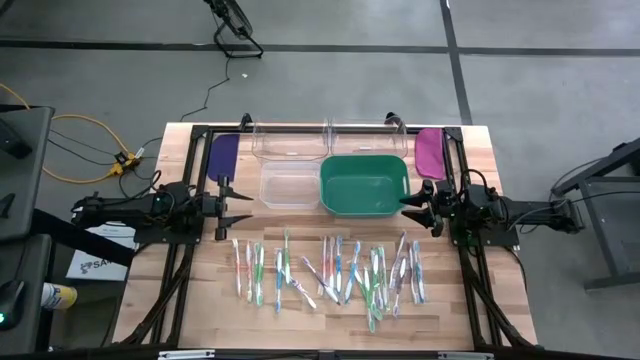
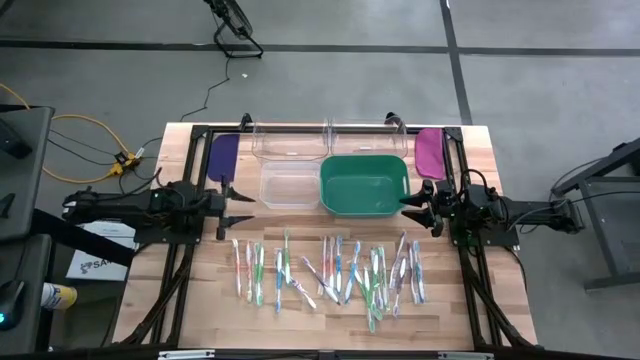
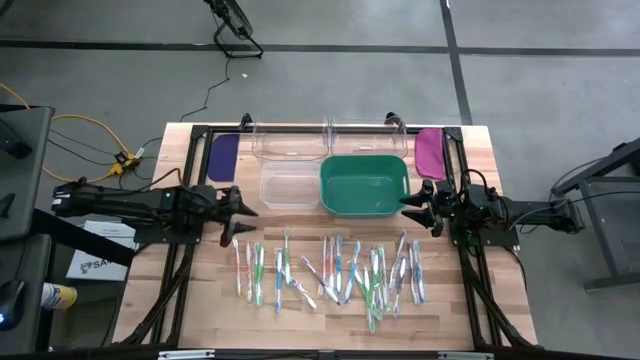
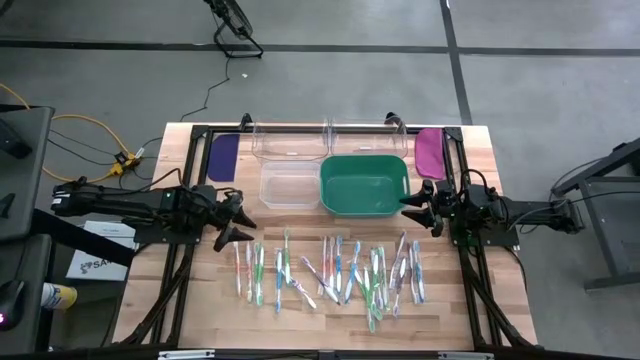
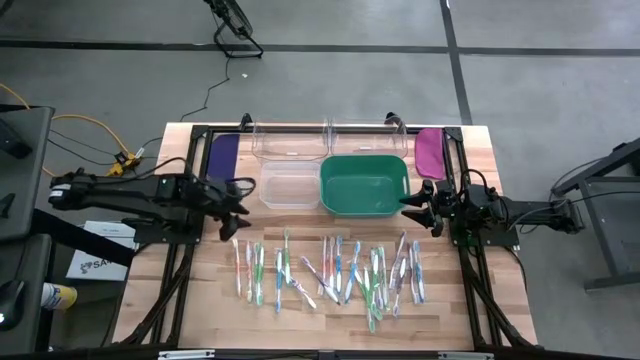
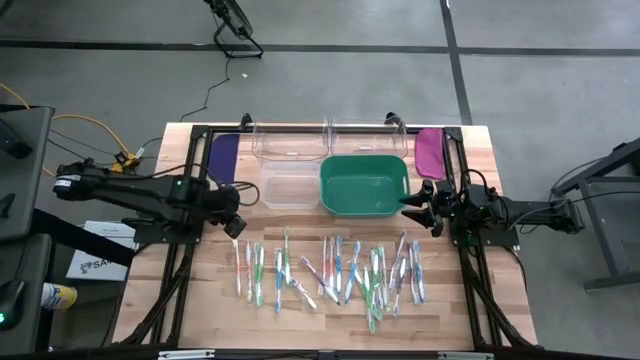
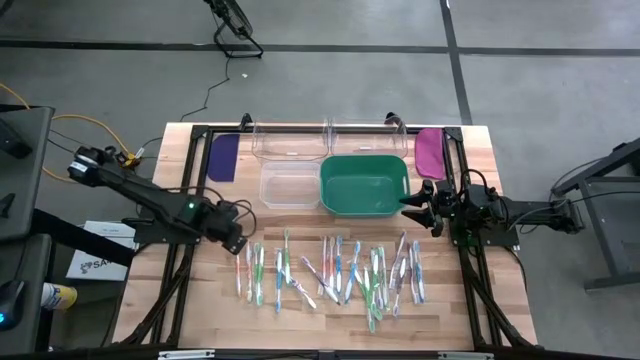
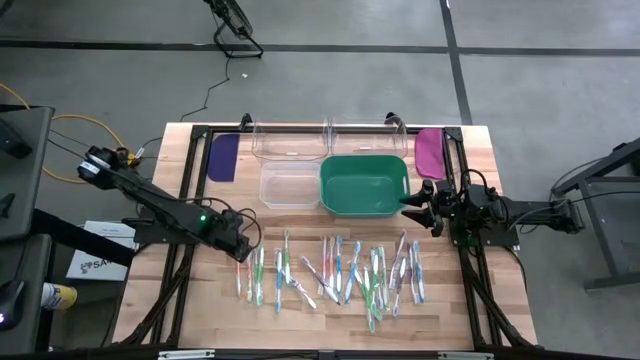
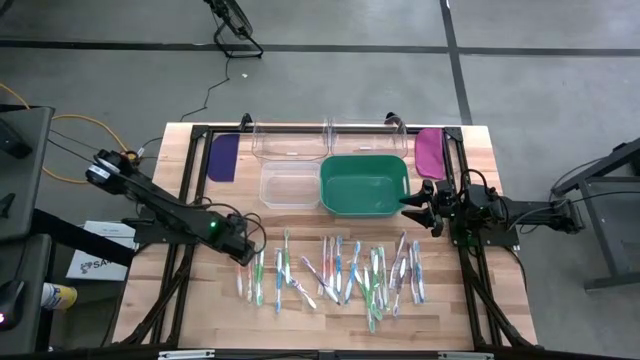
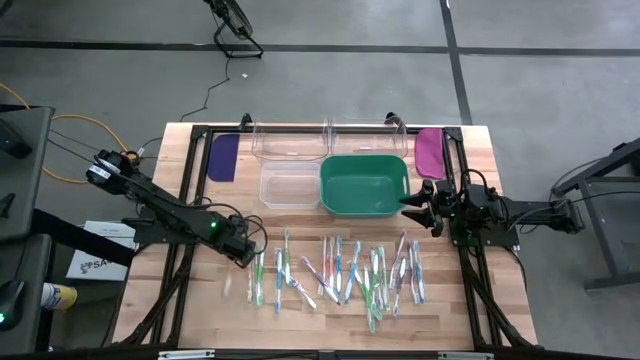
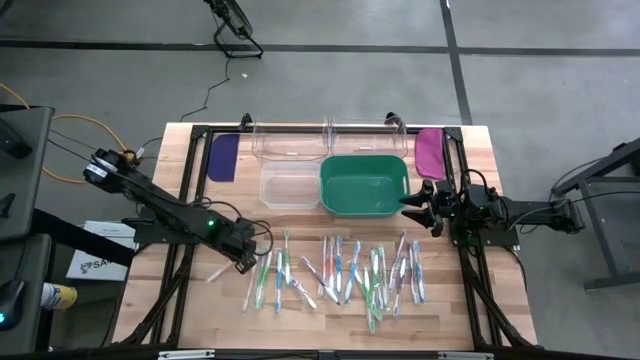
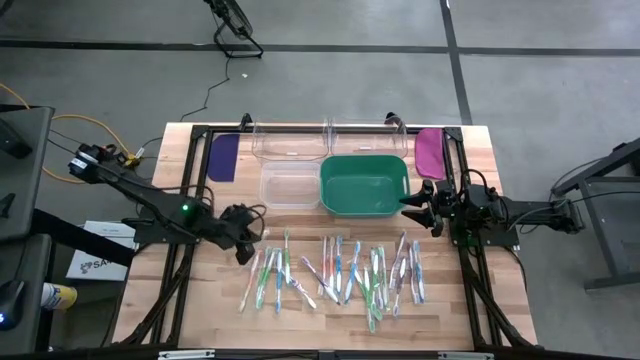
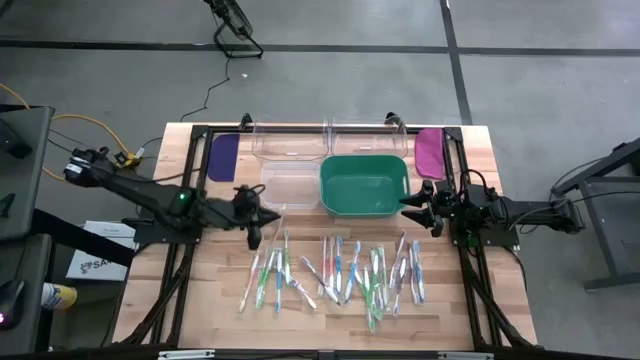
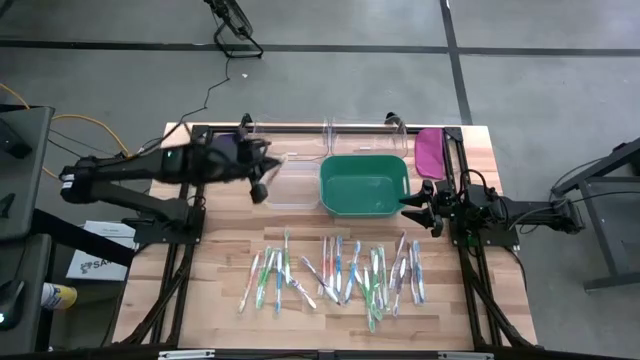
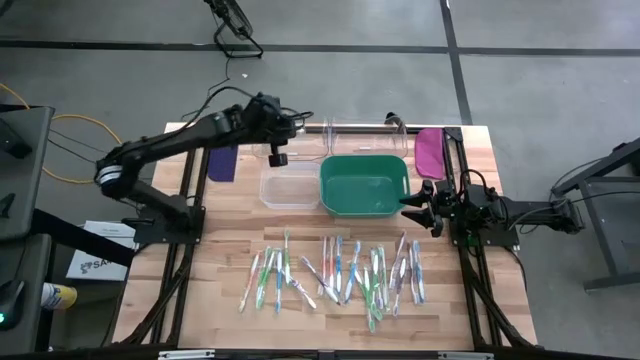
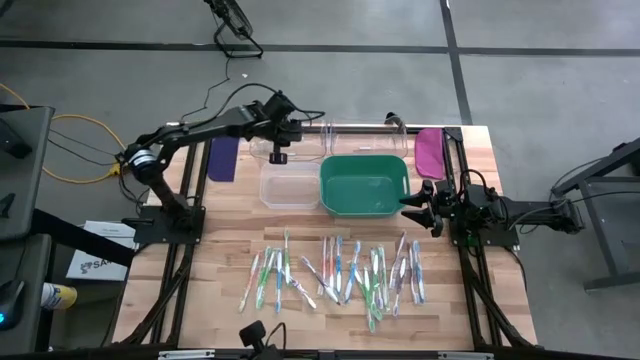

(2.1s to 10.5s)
Task: Pick & Place Toothbrushes
Put the orange toothbrush into the left transparent bin

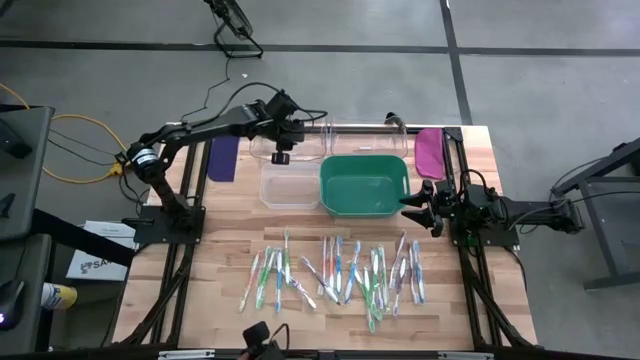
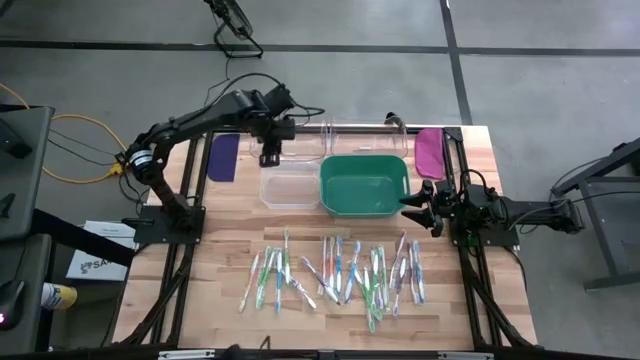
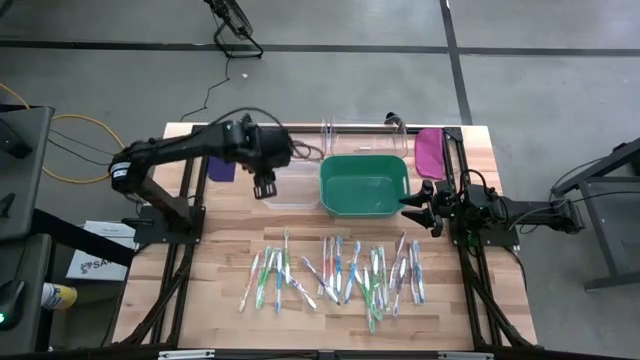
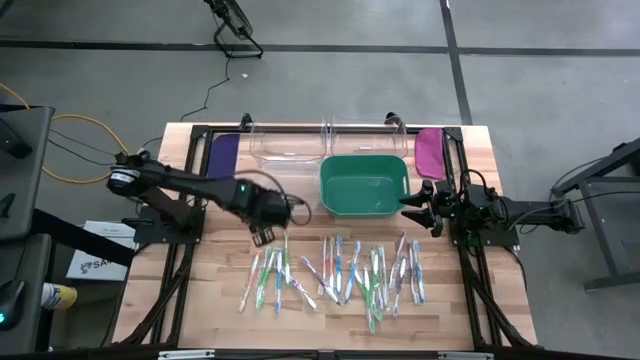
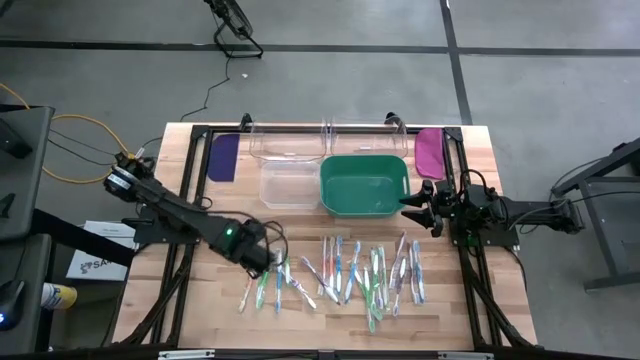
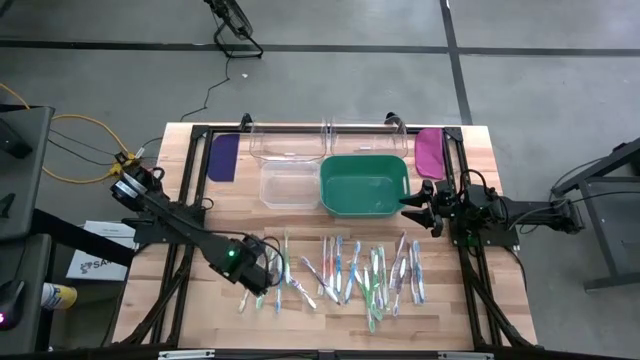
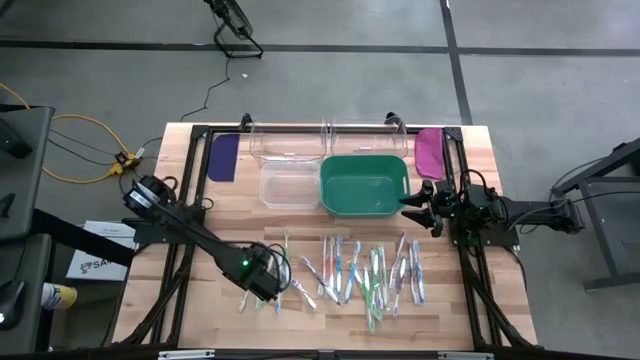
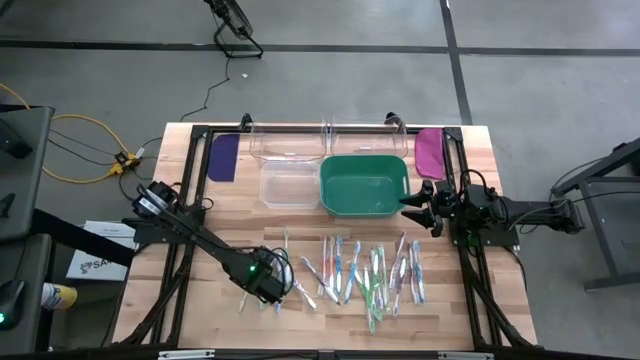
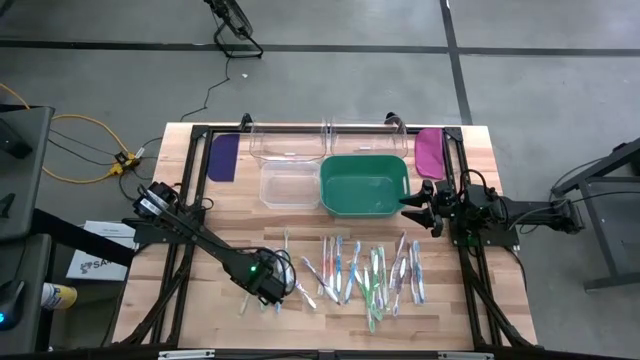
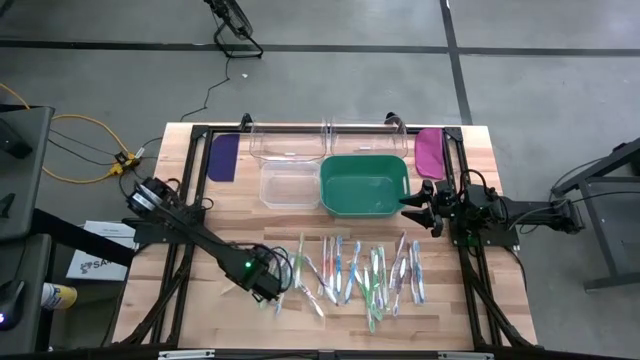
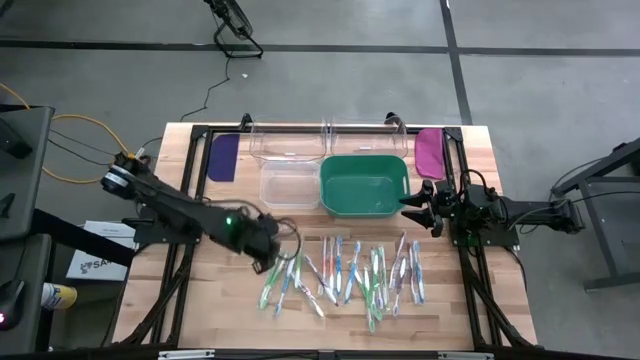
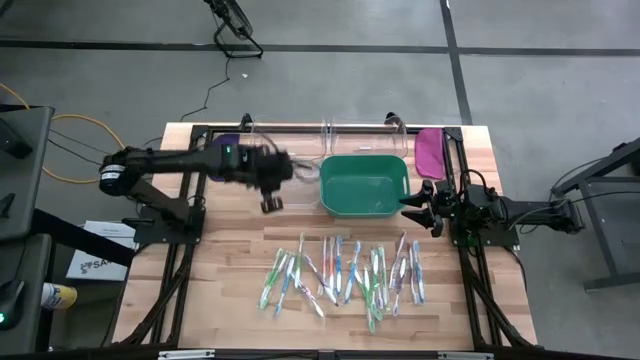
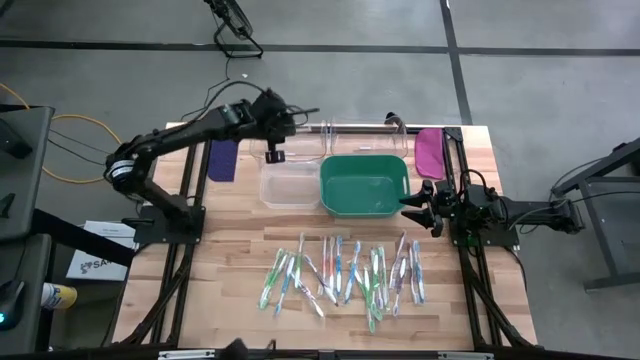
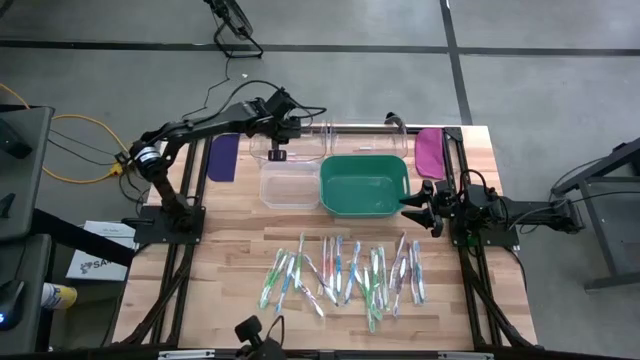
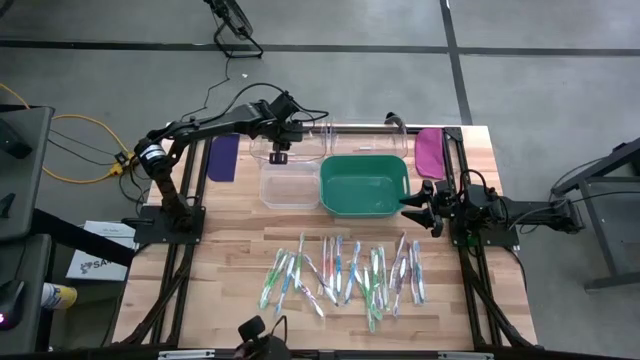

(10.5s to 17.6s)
Put the orange toothbrush into the left transparent bin

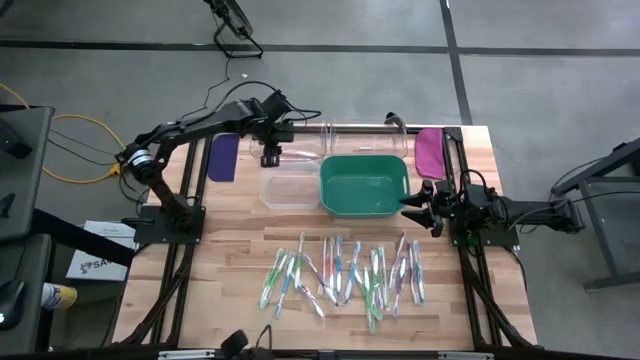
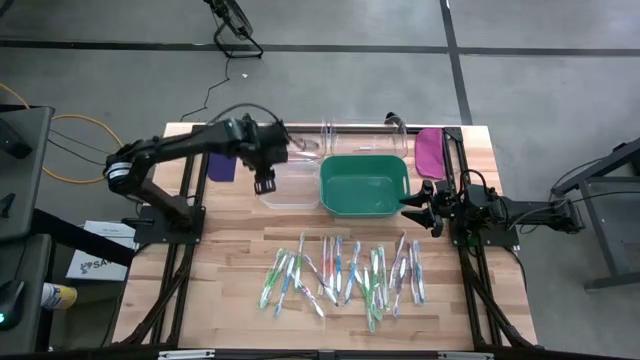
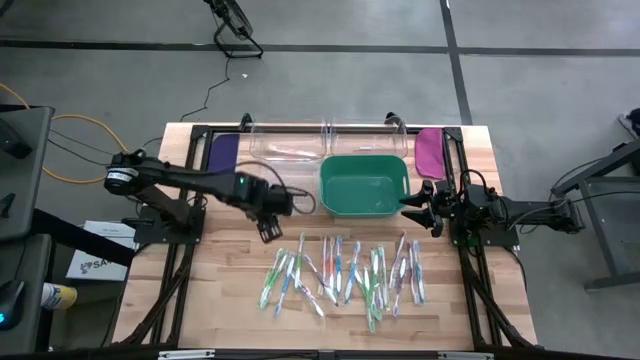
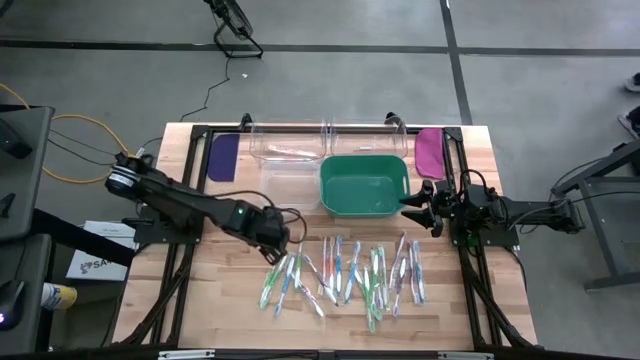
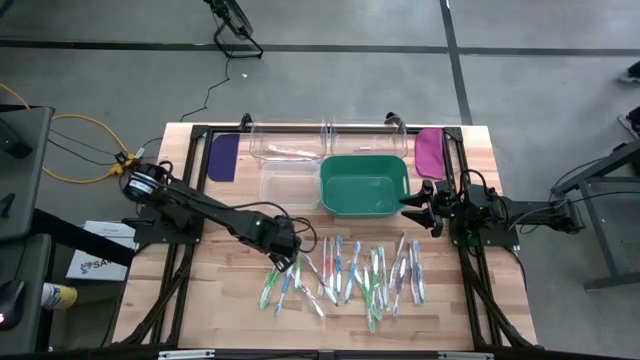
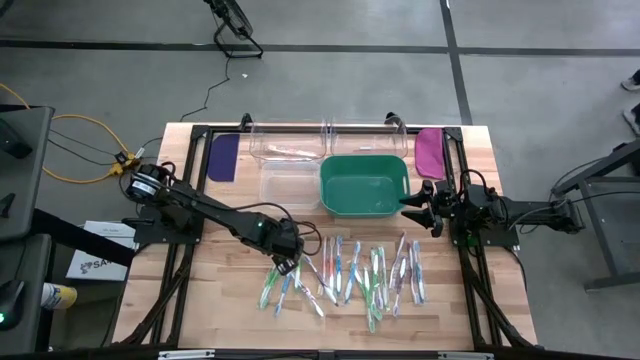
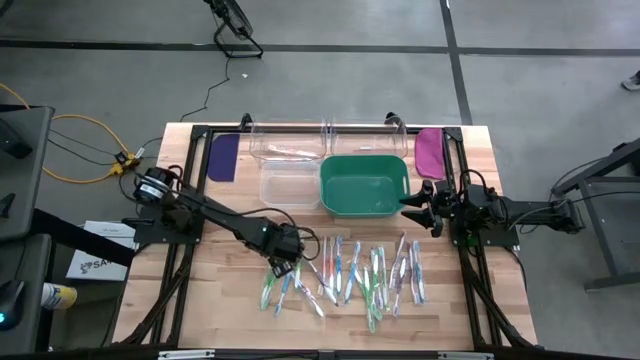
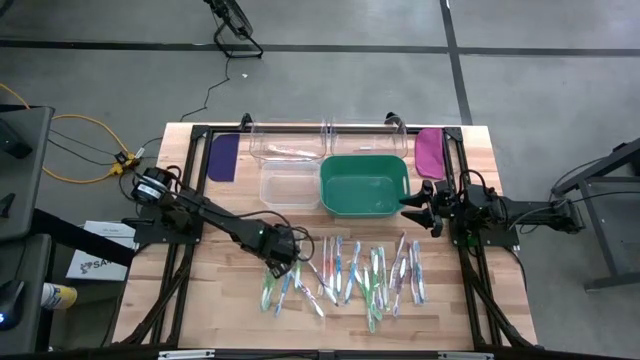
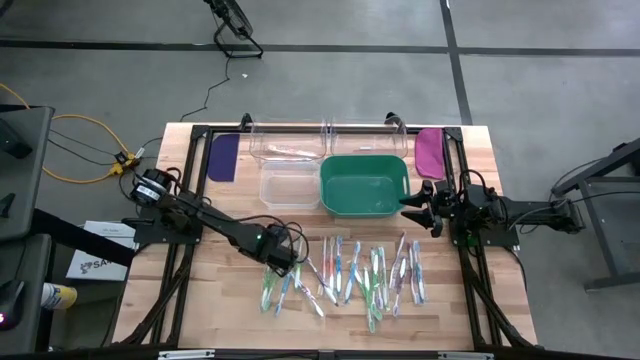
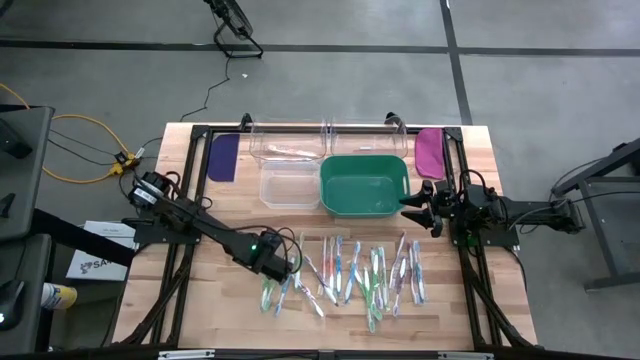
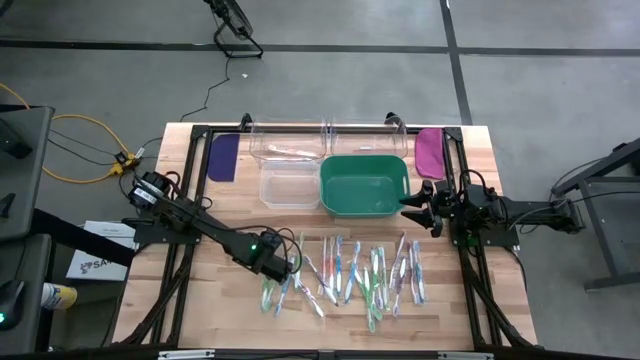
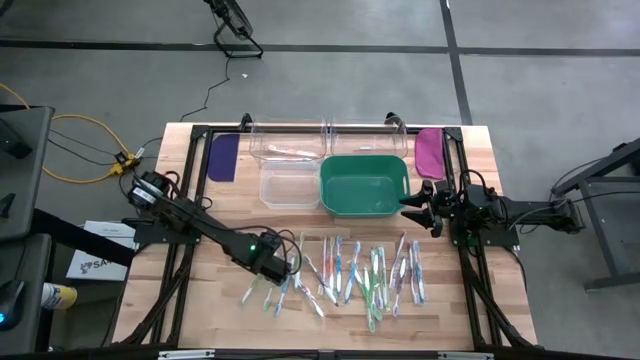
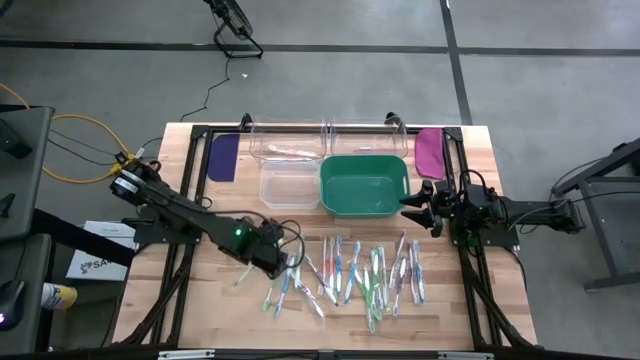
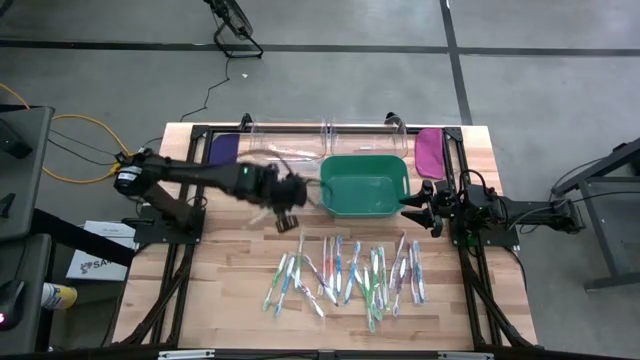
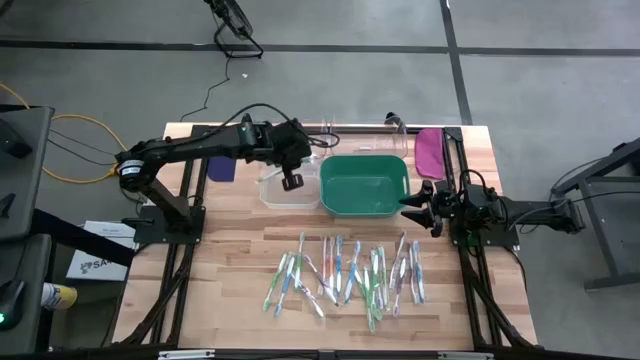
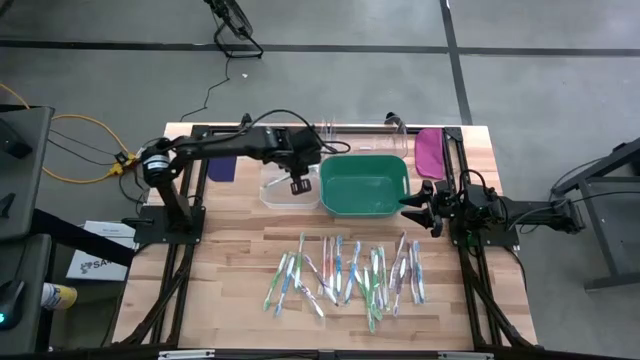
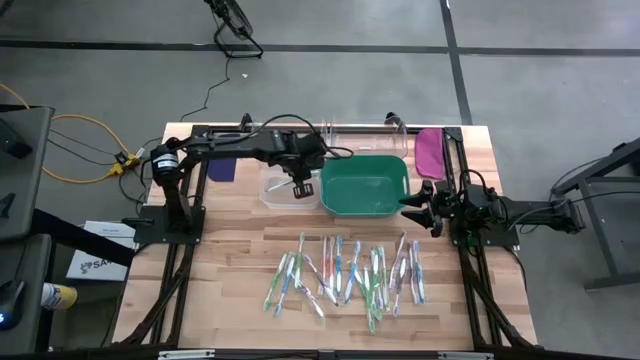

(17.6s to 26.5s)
Put the green toothbrush into the white bin
